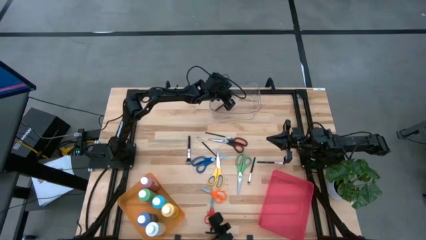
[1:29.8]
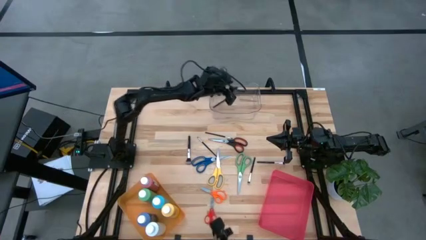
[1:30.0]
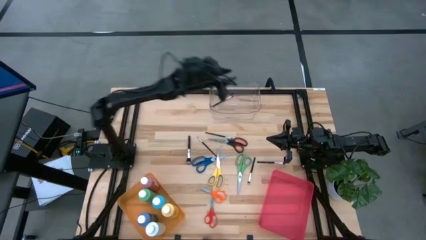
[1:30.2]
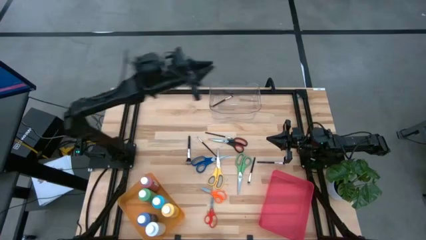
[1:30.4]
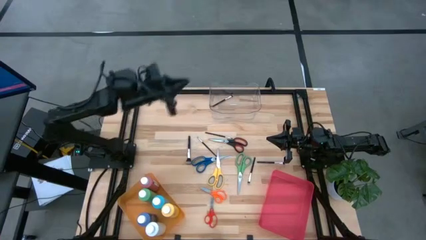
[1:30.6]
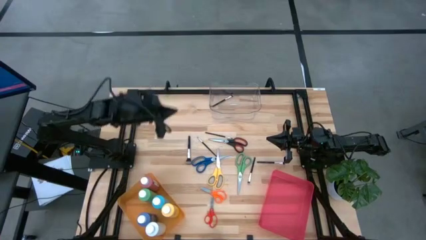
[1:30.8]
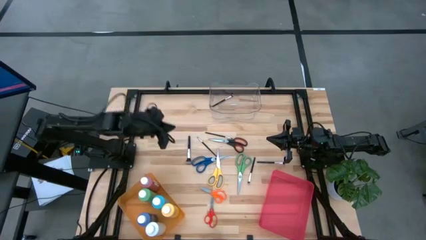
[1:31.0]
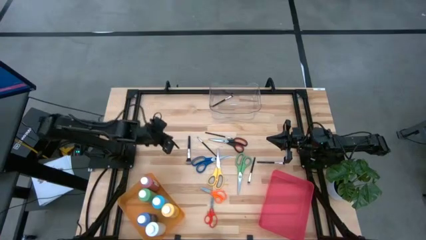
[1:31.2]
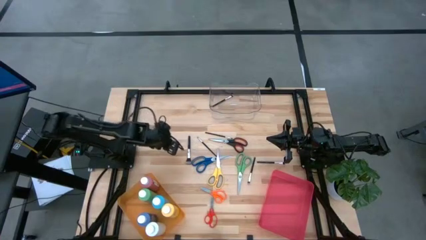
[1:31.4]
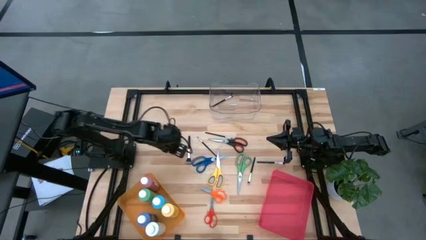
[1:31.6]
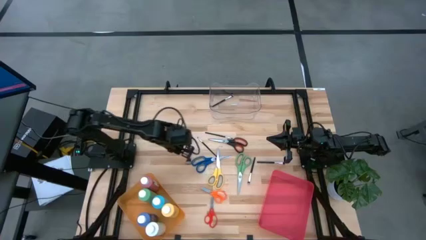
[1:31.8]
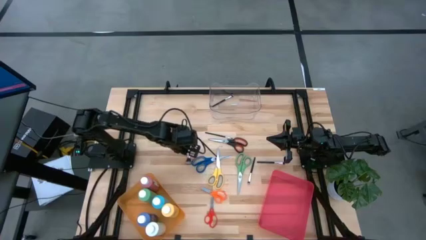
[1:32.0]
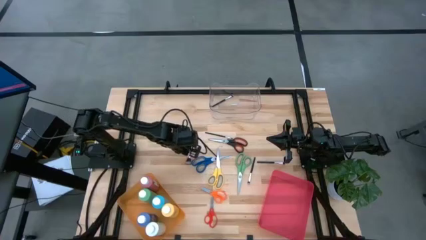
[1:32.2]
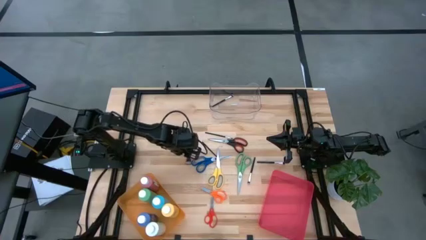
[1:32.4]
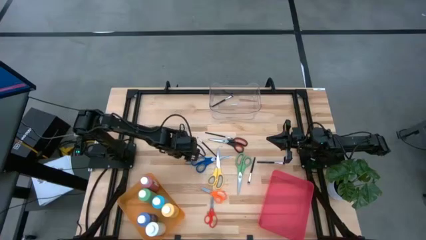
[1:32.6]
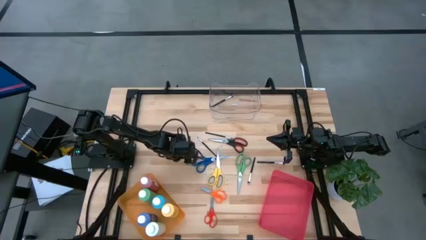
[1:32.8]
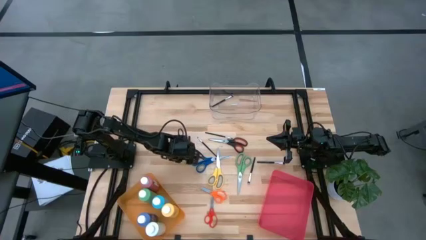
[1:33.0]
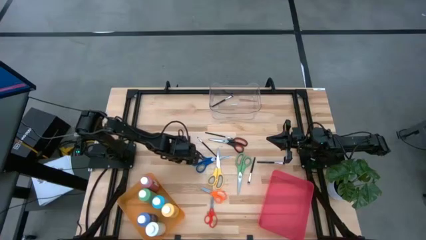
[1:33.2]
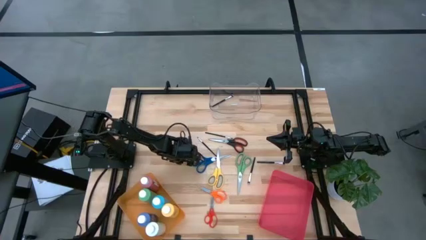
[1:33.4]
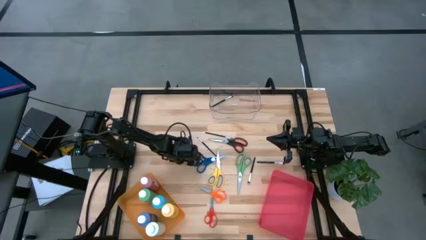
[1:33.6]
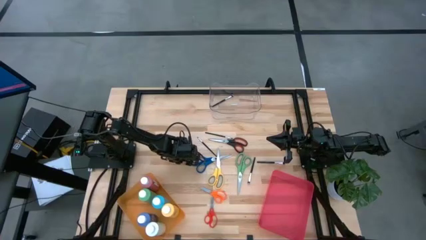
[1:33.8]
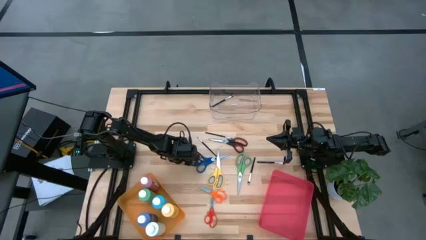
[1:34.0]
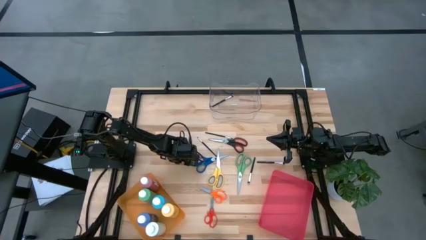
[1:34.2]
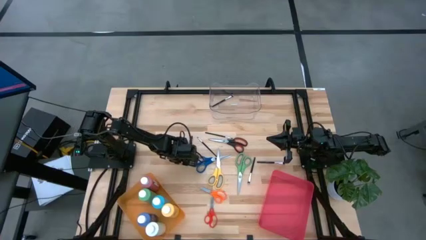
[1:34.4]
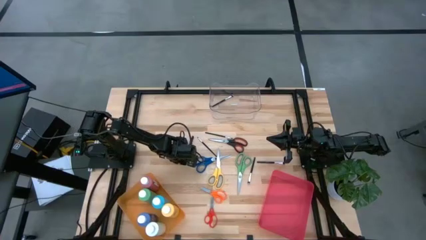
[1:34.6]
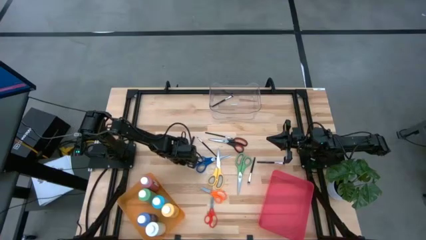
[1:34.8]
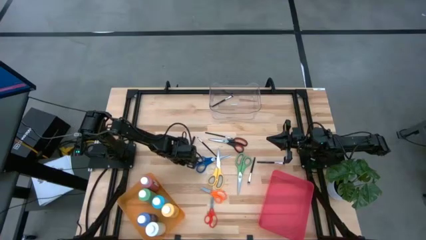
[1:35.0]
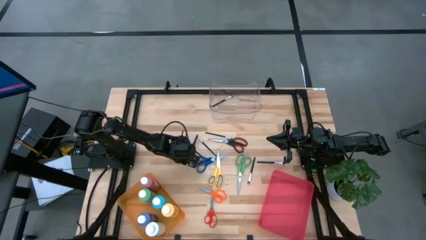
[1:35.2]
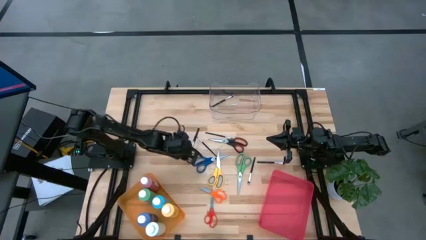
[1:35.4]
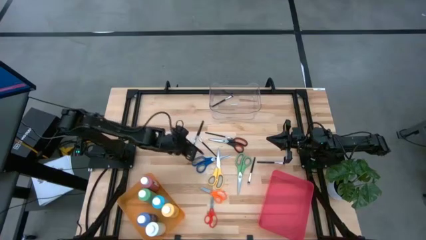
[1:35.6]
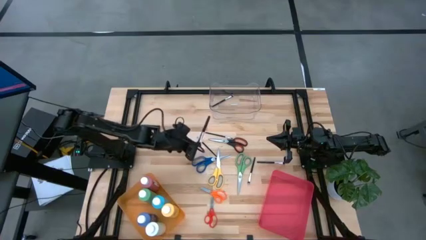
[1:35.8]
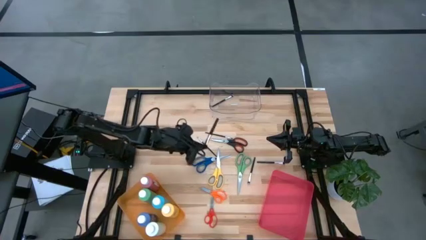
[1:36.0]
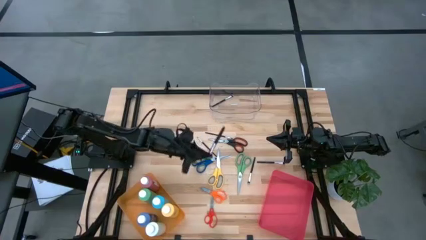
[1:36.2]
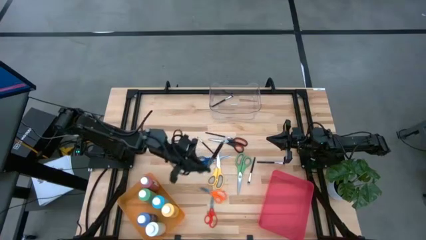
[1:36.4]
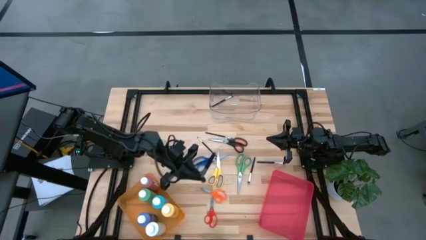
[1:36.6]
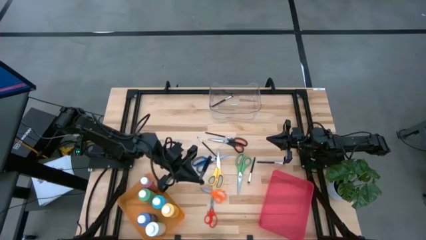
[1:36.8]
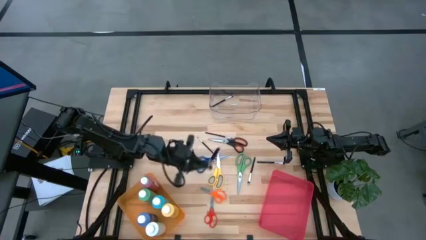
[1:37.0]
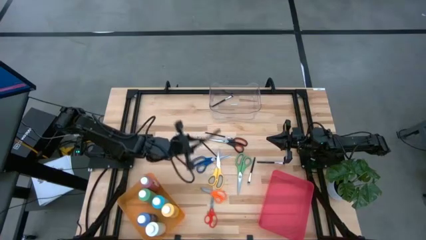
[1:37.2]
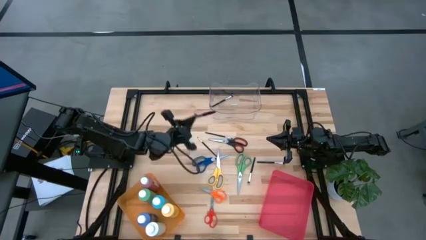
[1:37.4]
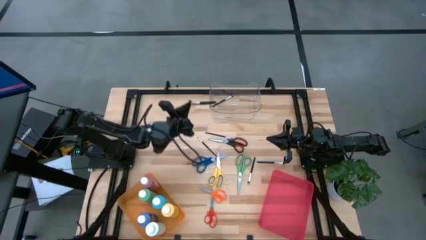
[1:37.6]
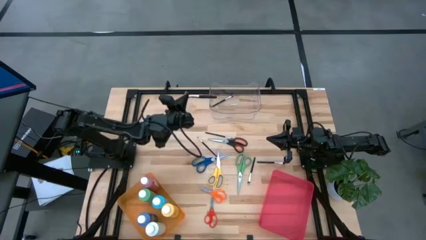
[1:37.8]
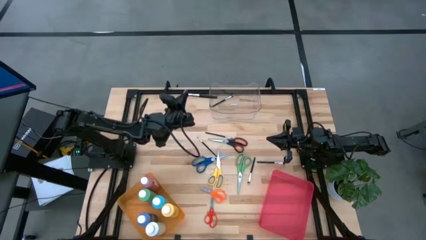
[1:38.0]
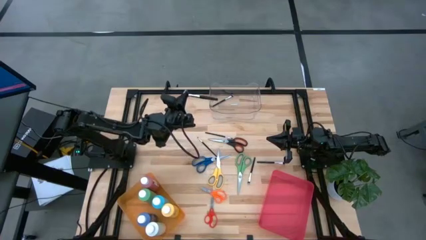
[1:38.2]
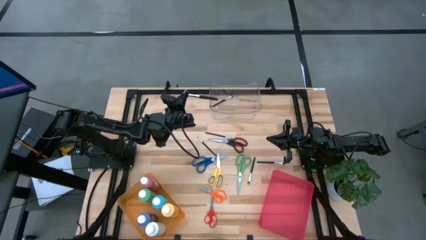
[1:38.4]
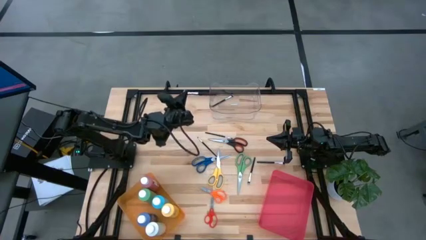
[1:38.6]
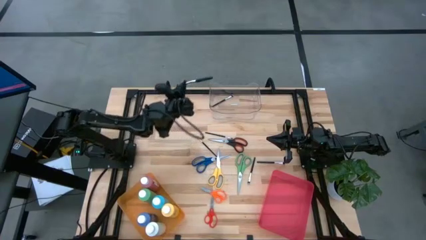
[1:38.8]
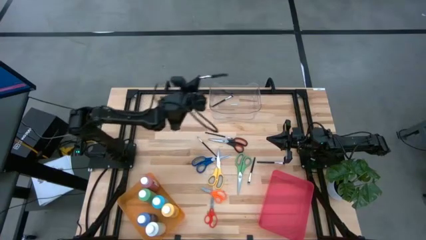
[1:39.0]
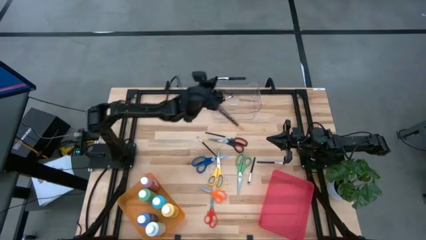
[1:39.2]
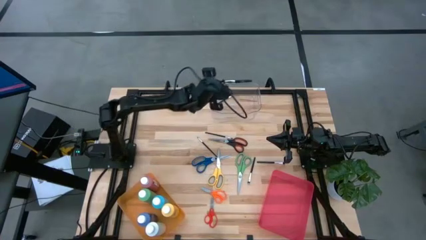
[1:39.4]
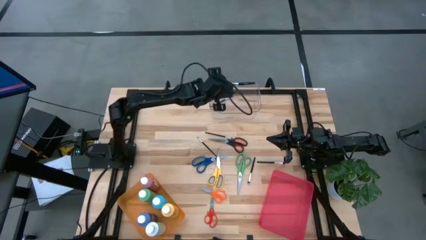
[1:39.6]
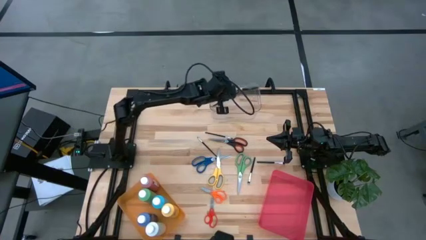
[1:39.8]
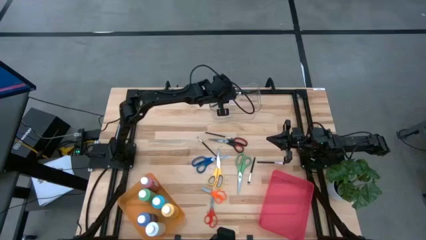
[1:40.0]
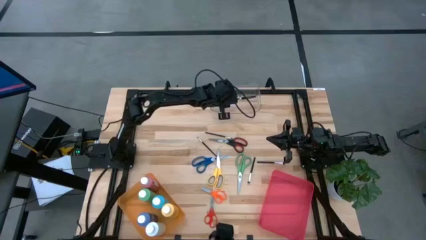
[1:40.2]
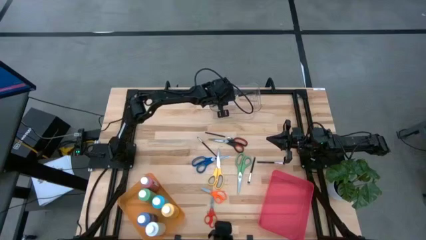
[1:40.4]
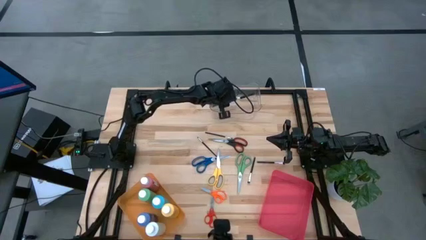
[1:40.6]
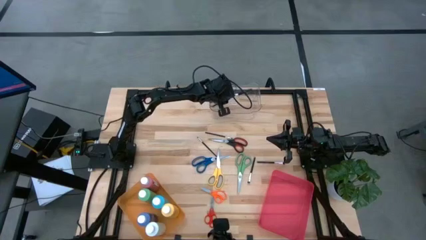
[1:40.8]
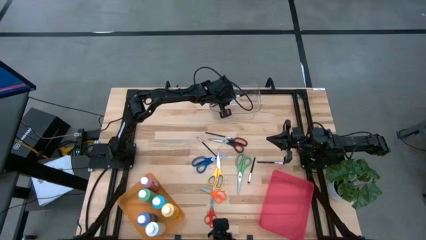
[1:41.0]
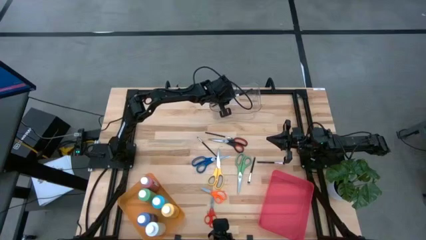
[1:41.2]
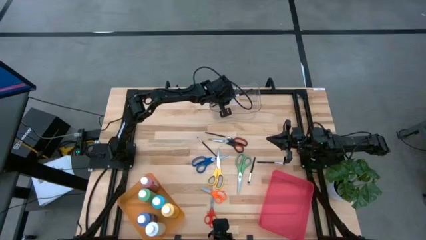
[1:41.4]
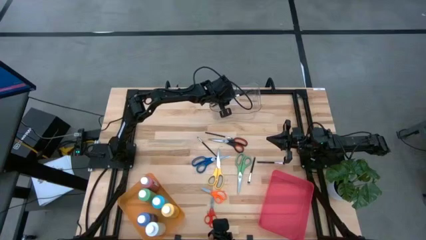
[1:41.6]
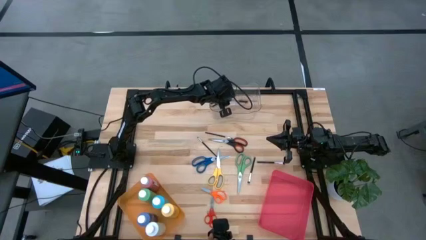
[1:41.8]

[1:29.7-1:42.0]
Task: Pick & Place Paint Supplies
Put the powder brush into the transparent bin

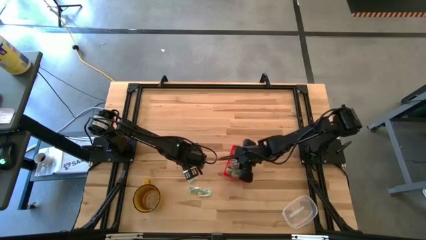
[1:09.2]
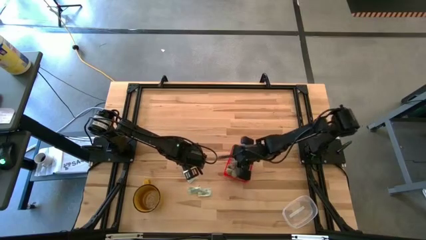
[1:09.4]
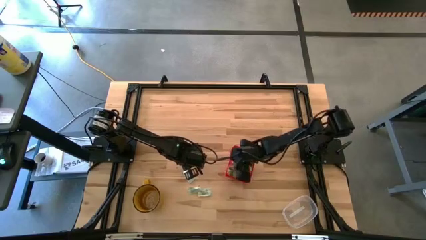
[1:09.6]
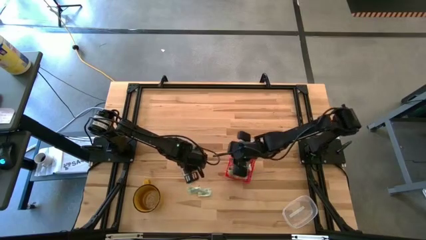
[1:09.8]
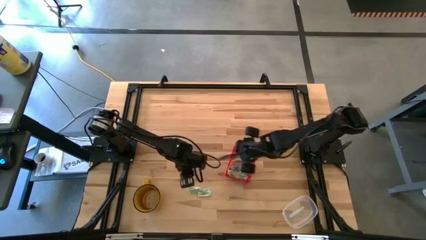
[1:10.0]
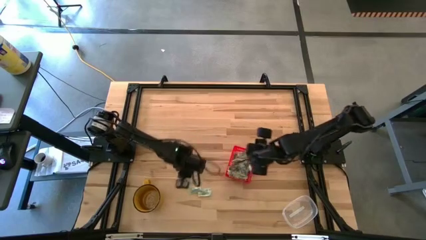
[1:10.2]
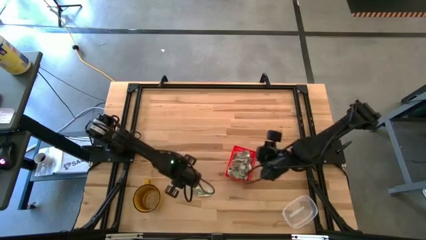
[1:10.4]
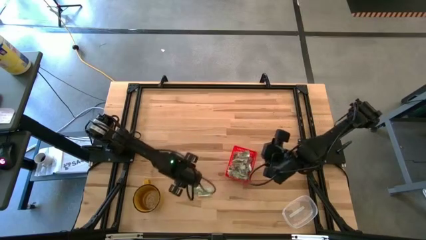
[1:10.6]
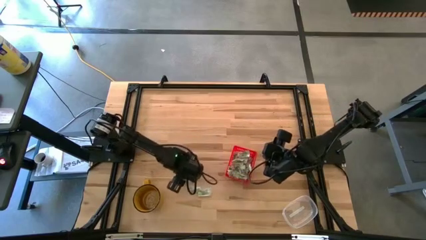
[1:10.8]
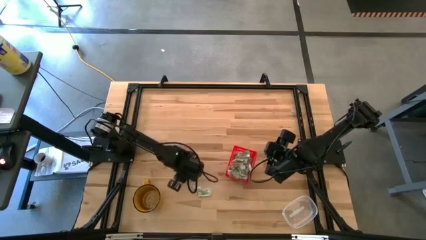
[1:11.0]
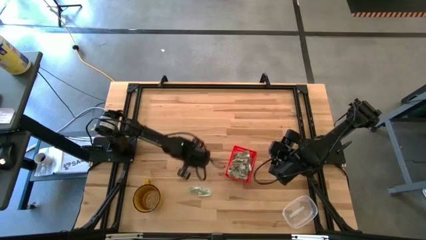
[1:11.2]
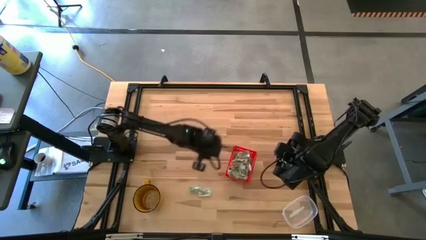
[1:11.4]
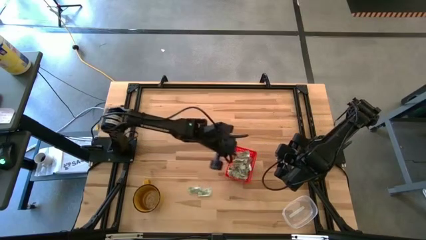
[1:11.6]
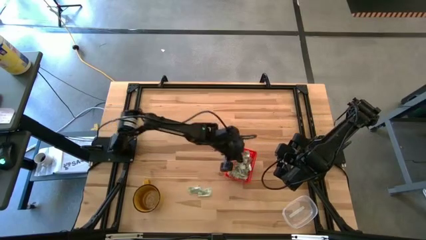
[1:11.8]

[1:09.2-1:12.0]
Task: Pick and place items into bin
Put the top light green stevia packet into the red bin

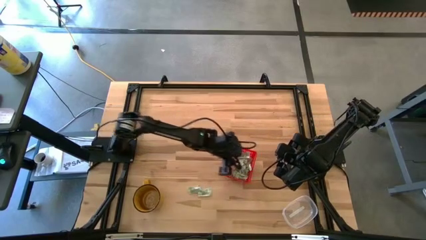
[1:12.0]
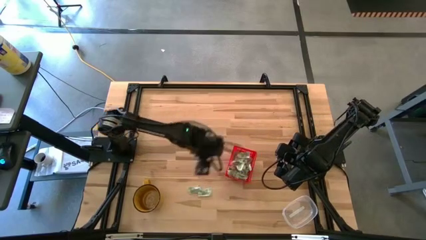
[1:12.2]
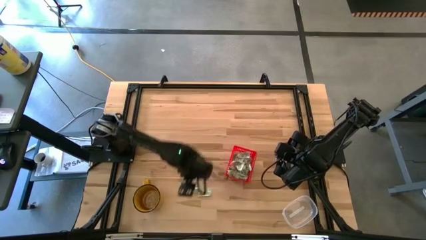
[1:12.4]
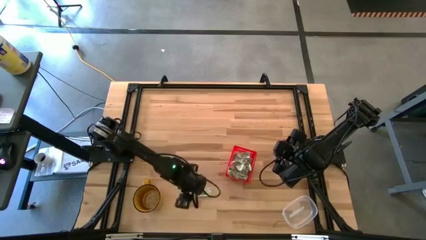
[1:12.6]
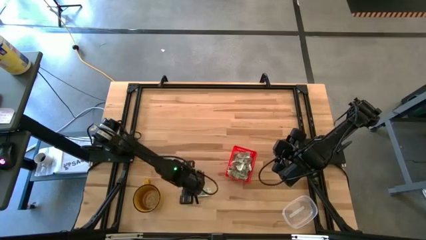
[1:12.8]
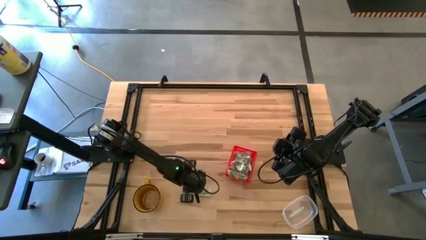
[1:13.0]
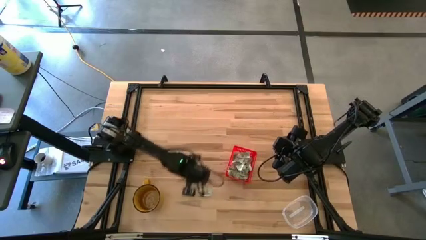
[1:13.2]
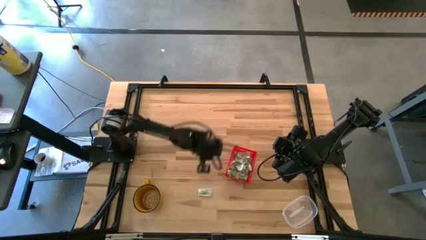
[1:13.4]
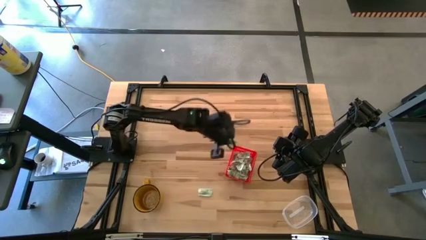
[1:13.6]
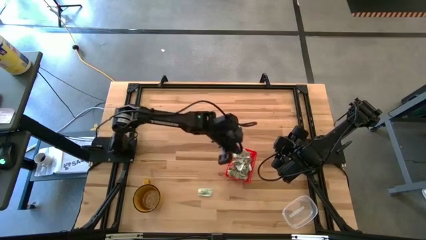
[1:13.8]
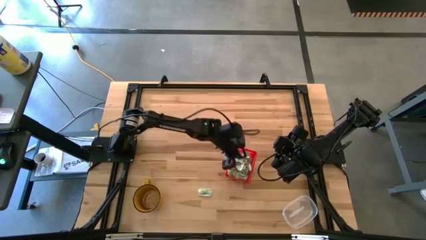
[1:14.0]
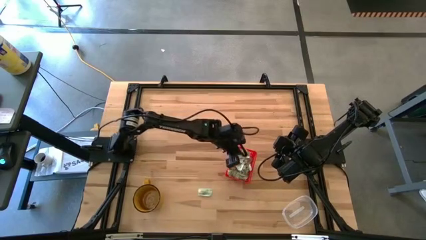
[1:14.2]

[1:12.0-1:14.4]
Put the left light green stevia packet into the red bin
